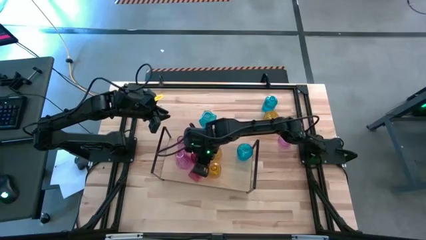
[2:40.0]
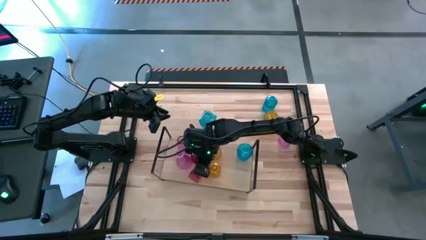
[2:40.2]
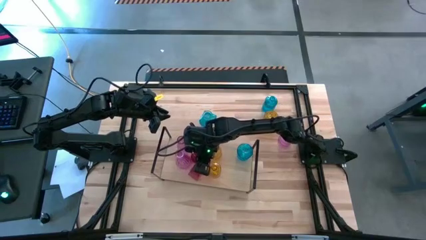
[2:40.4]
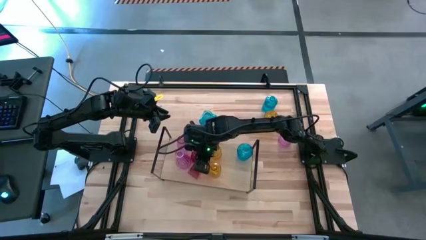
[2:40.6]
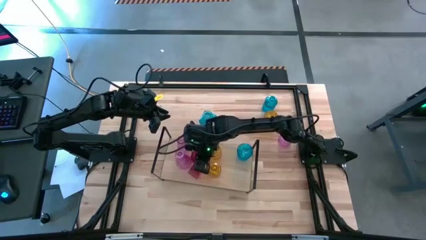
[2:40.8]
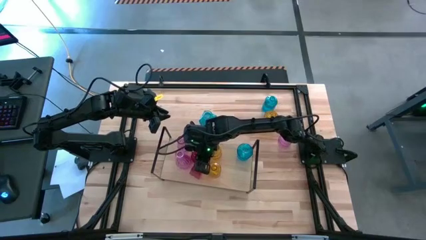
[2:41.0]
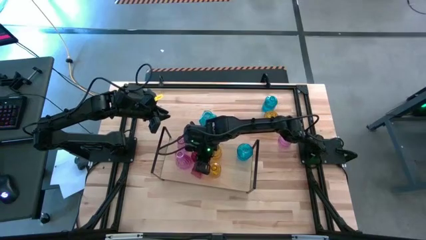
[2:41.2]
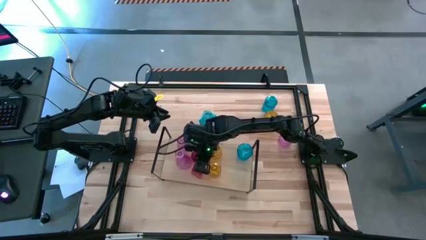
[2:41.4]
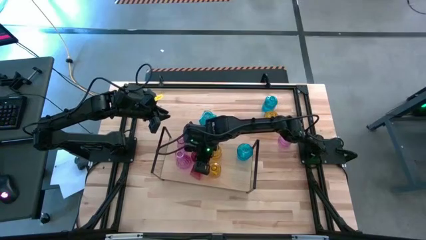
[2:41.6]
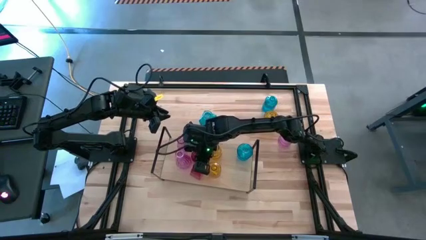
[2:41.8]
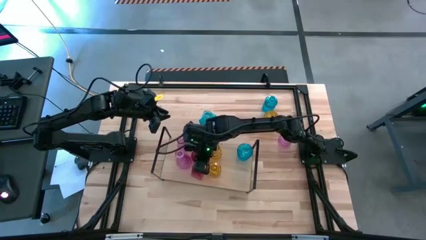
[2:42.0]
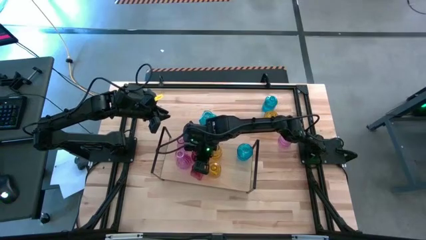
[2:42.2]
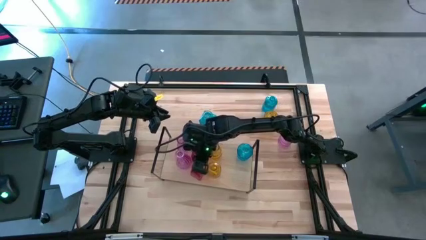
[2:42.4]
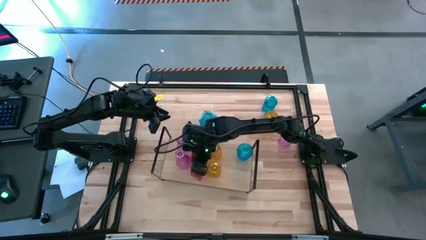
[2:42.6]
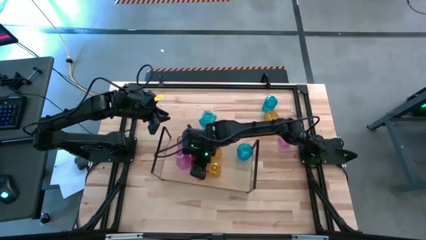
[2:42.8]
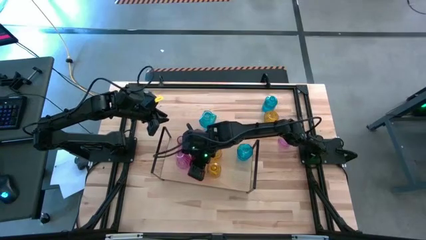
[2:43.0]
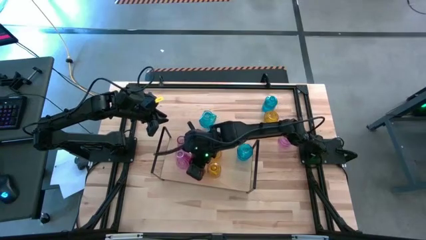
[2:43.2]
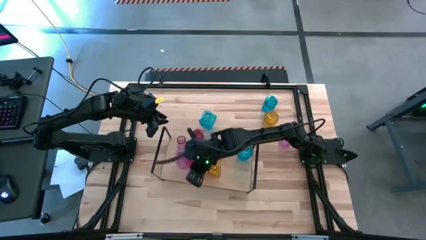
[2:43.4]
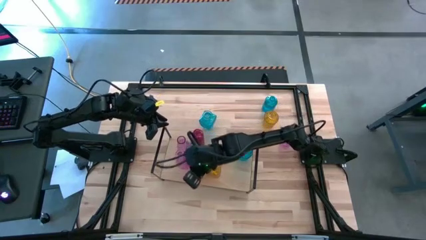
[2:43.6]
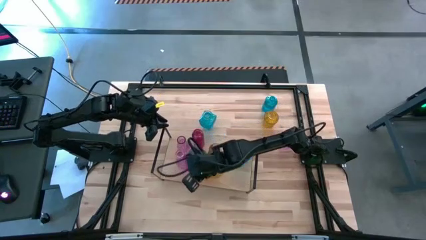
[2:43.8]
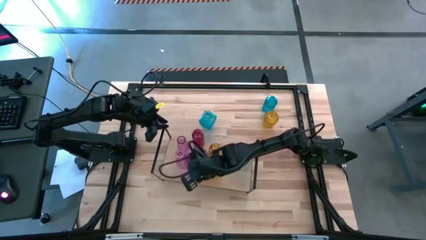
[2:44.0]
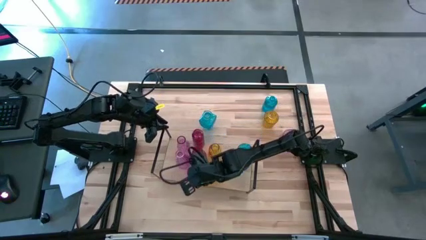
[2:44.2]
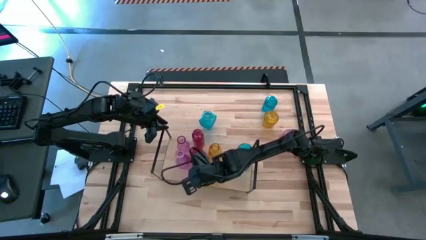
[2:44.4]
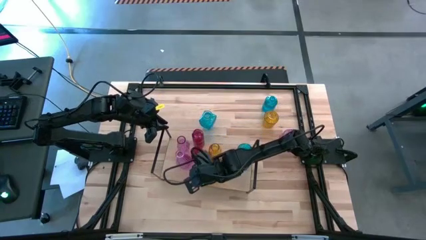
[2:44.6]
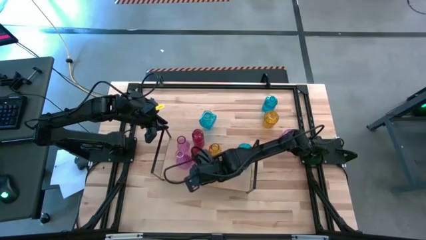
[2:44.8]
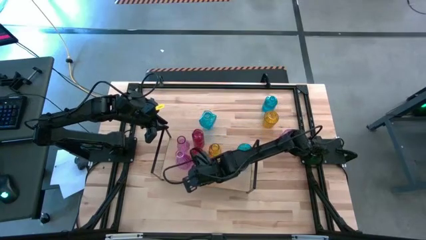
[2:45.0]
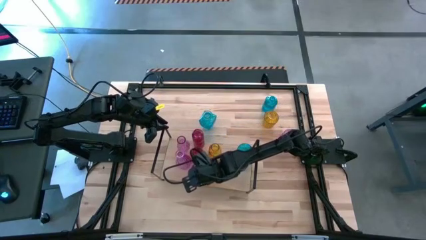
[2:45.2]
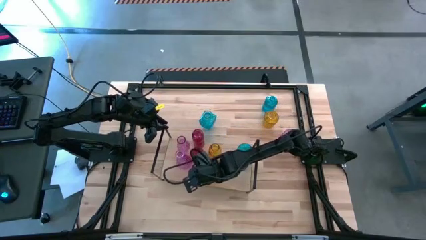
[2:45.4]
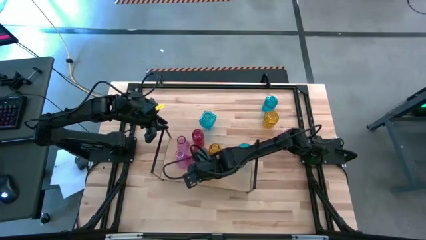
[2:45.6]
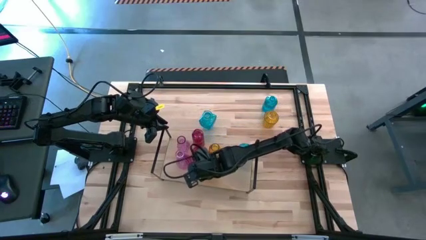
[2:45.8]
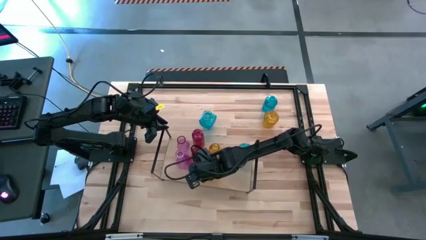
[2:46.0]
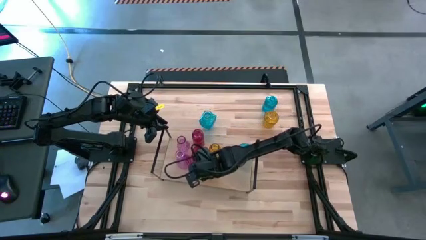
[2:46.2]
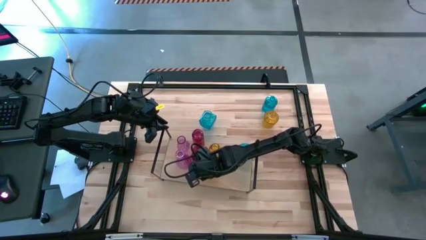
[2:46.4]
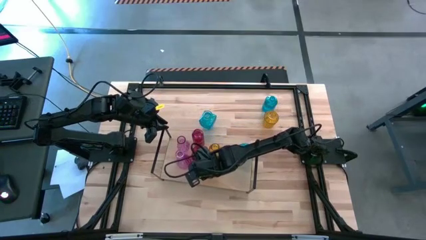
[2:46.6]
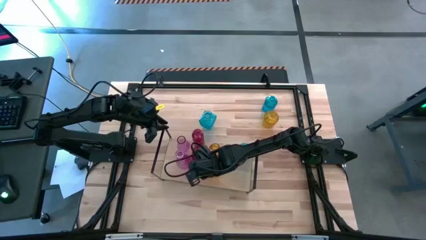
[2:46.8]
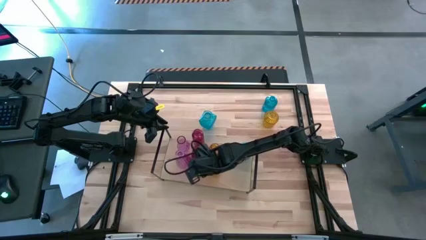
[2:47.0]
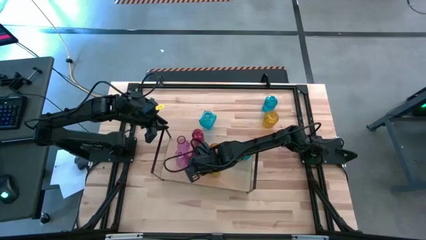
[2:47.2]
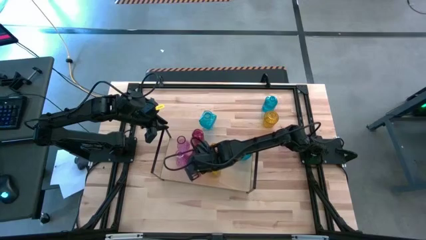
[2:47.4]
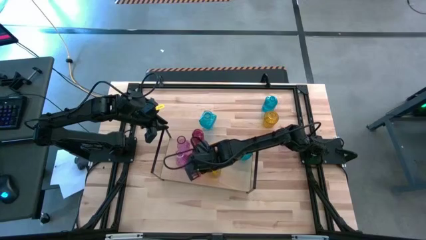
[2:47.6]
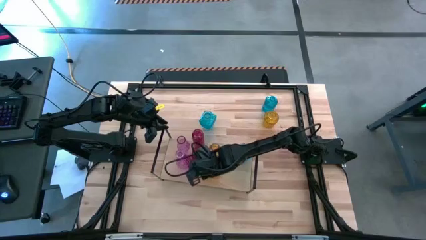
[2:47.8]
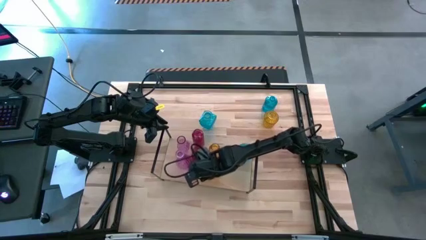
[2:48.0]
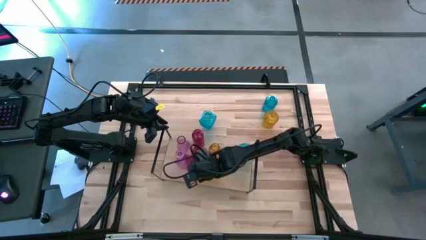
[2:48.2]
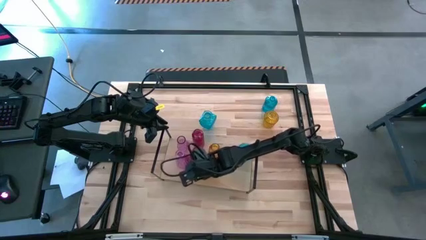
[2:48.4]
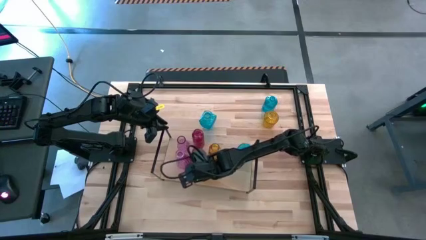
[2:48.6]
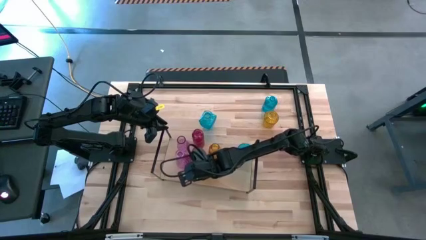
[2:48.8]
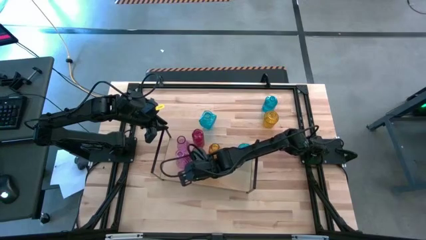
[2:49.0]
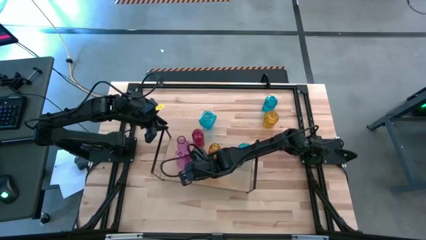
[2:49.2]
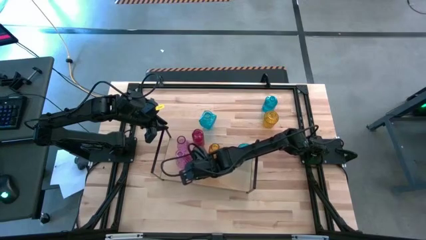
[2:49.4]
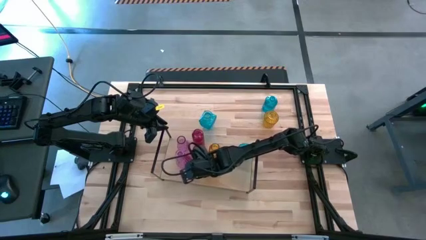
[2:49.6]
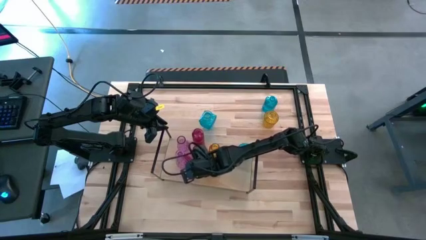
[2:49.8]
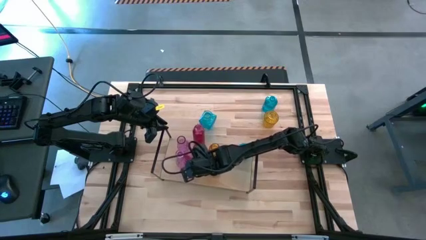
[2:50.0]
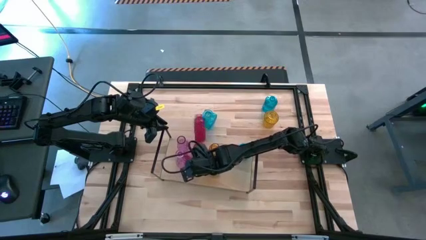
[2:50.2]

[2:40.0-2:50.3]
Task: sort vases onto shelf
Put the red vase on the shelf aligned with the other red vase

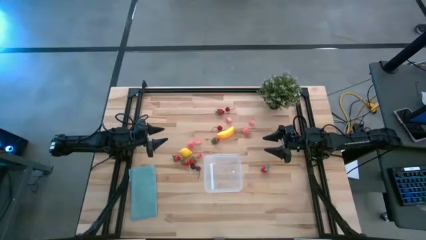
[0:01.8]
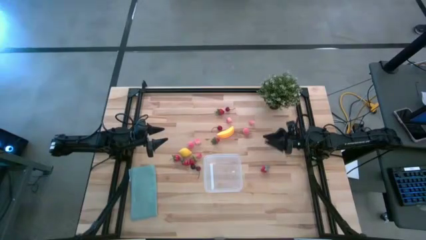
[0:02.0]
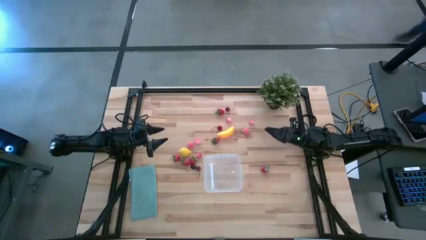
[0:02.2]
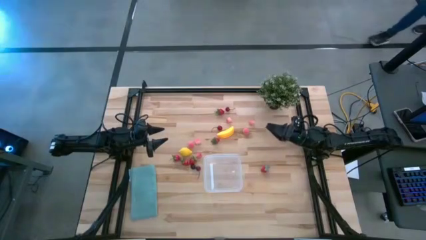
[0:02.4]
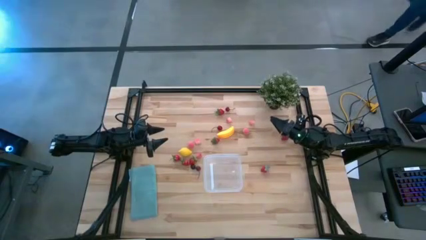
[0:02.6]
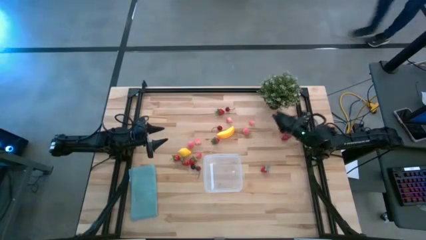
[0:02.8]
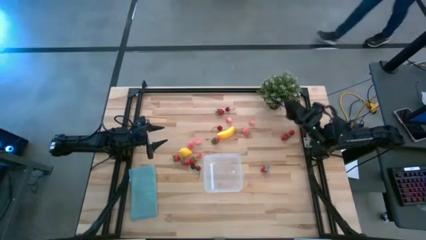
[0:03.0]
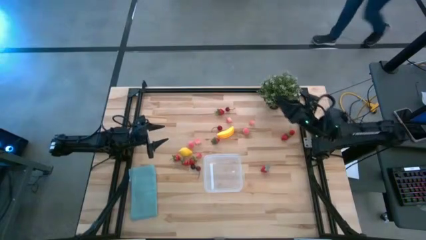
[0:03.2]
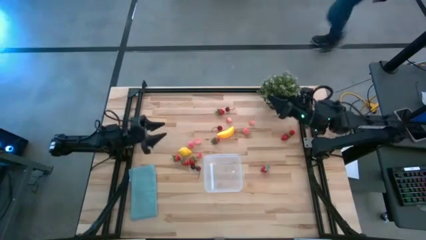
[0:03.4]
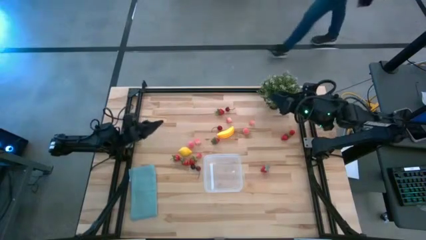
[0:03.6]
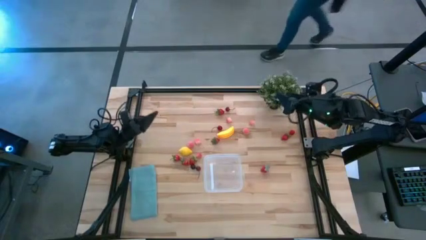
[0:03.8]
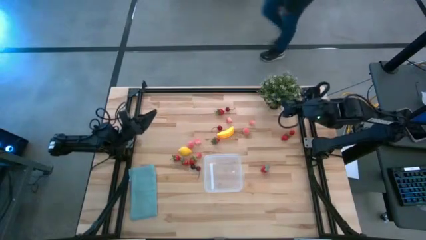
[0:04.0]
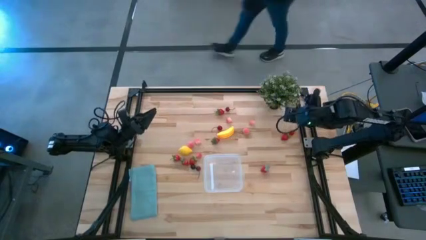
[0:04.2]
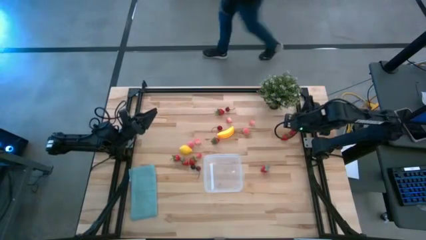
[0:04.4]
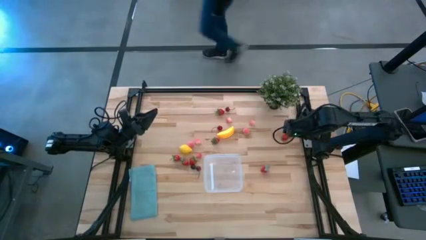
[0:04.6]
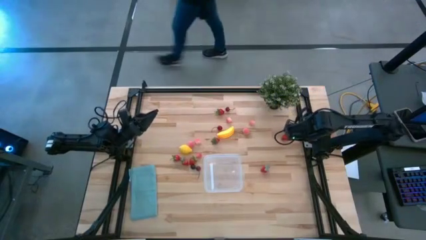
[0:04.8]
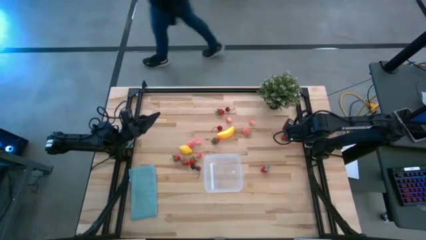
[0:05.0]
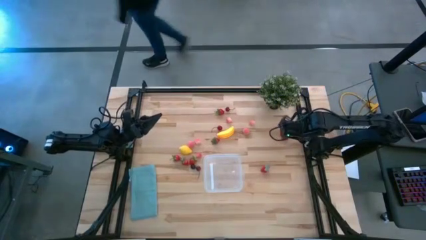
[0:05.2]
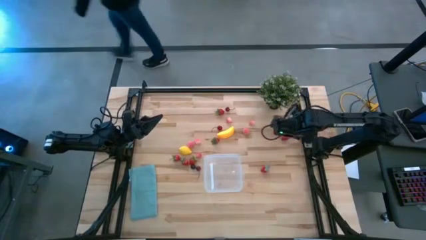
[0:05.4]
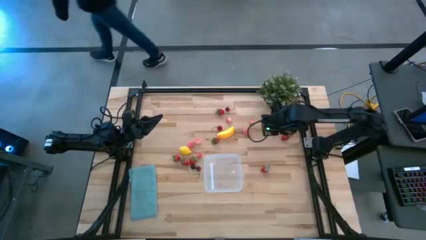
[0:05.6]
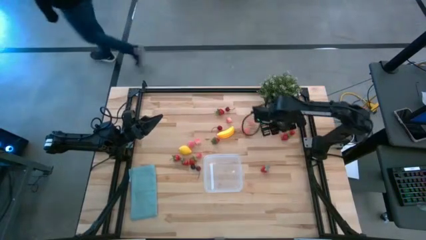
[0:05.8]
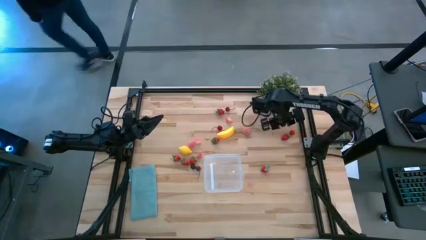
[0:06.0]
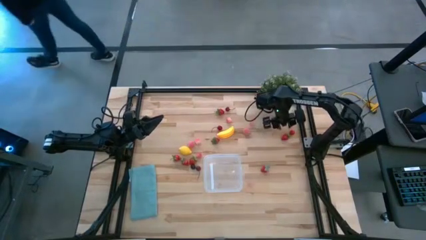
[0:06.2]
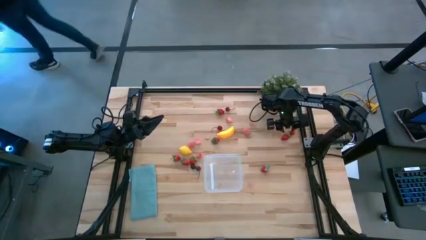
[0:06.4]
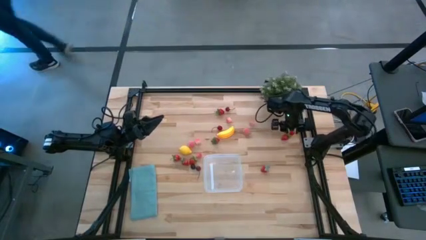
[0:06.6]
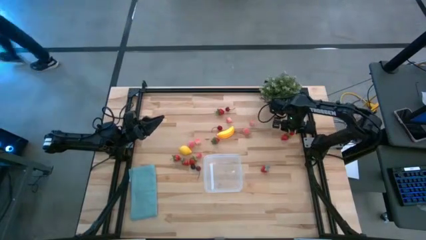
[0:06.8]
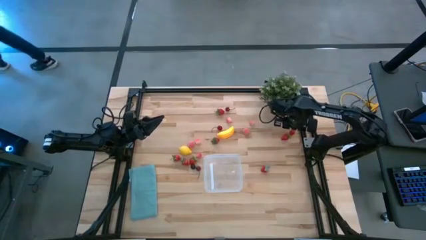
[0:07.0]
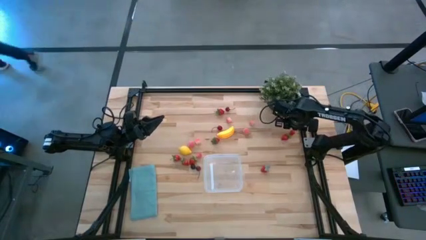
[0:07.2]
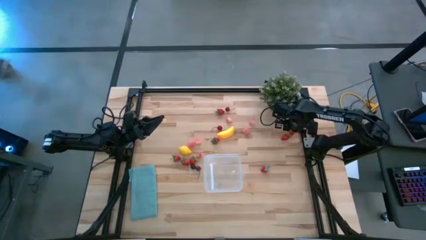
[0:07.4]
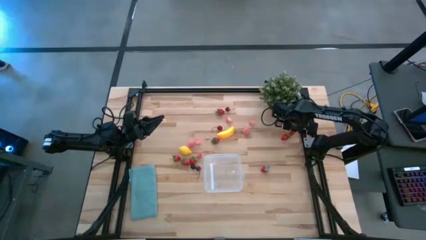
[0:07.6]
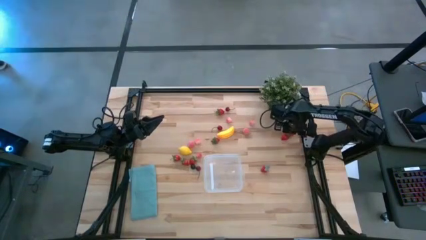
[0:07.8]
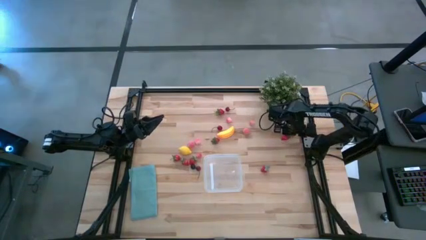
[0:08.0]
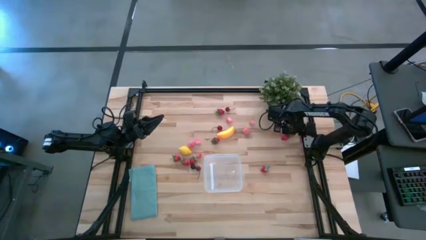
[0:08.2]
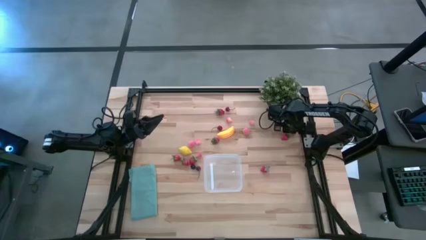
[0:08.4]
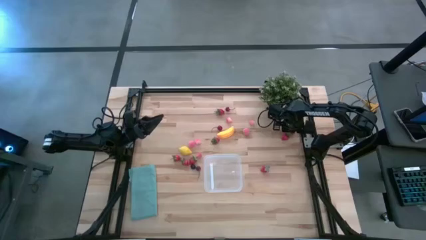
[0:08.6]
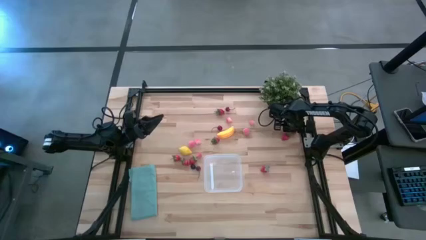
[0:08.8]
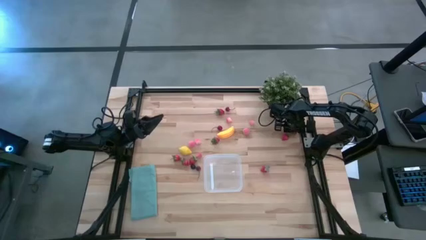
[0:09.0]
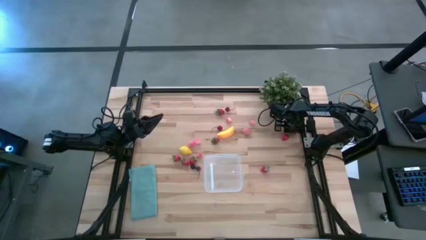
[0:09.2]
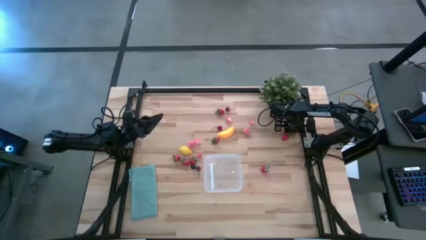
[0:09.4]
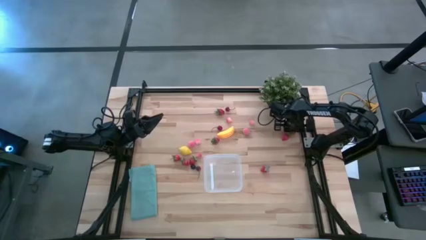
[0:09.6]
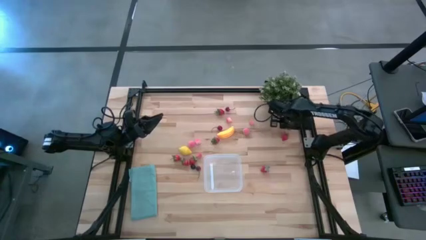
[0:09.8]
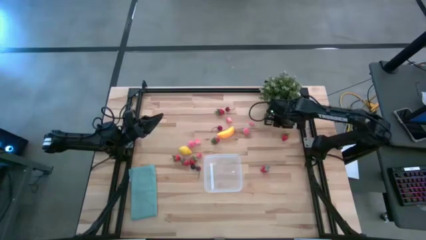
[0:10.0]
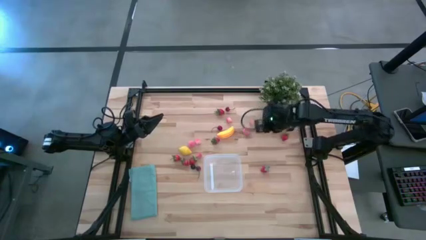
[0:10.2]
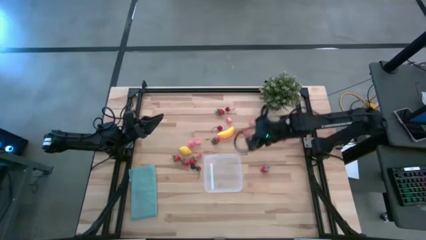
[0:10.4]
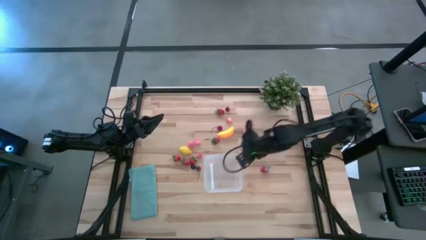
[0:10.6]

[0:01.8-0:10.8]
Task: Pick and placing Produce into tupperware
Put the red cherry into the transparent container
